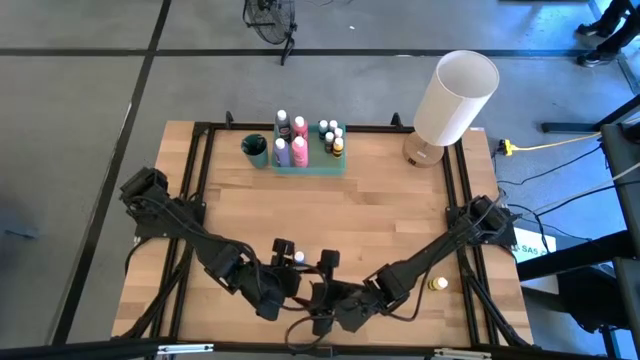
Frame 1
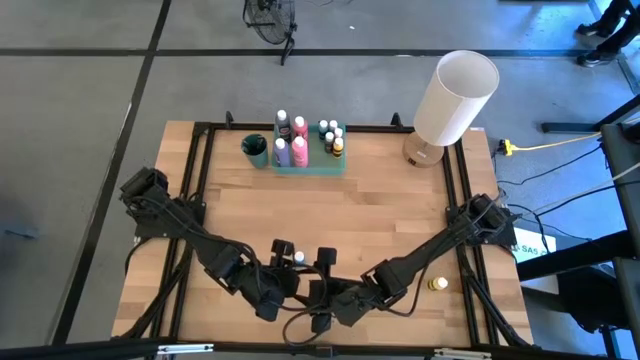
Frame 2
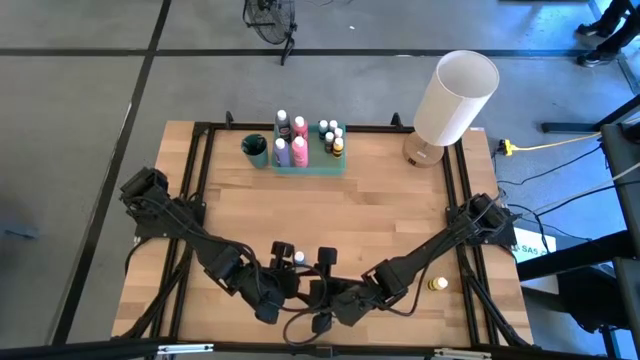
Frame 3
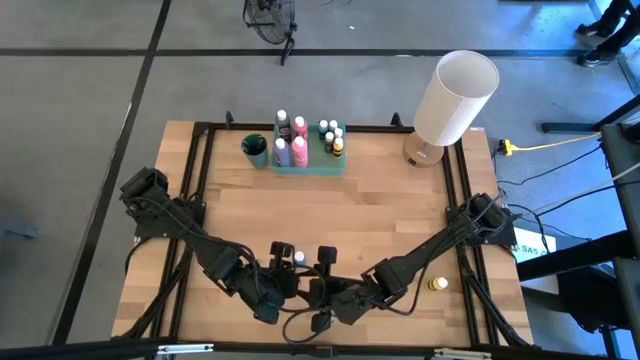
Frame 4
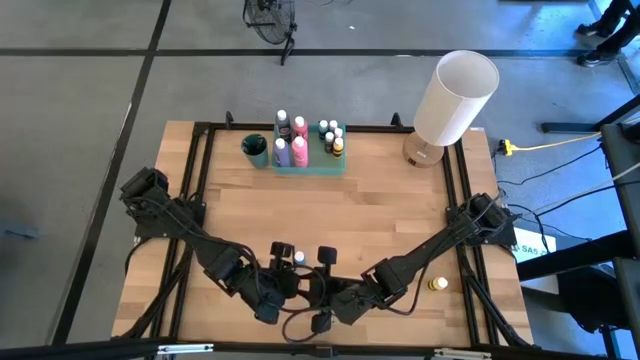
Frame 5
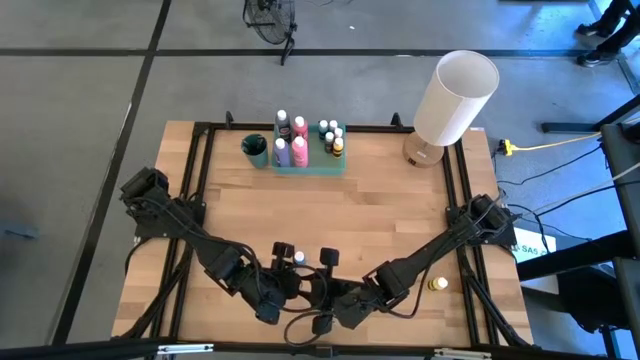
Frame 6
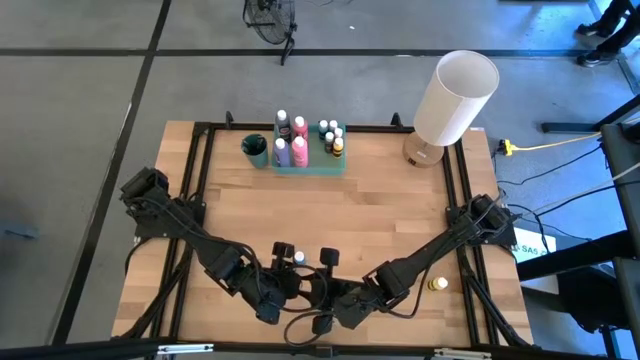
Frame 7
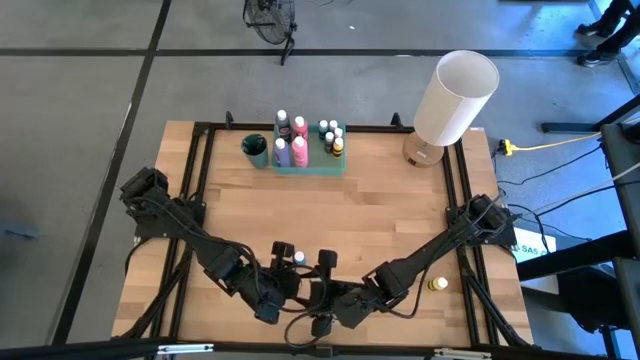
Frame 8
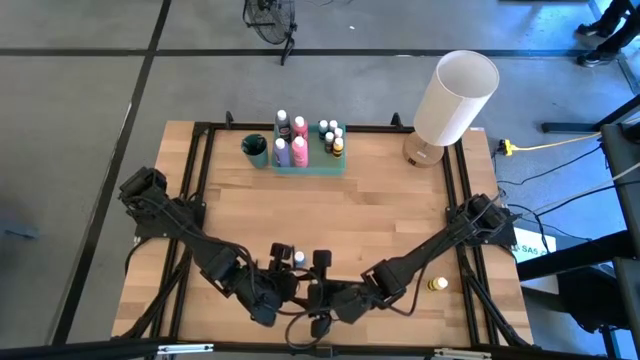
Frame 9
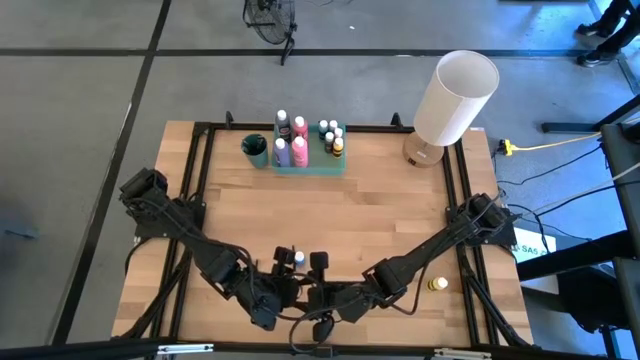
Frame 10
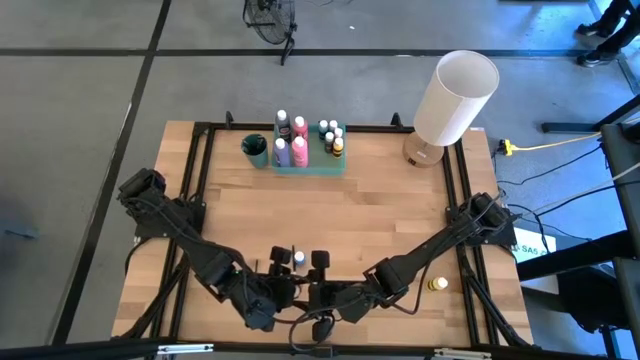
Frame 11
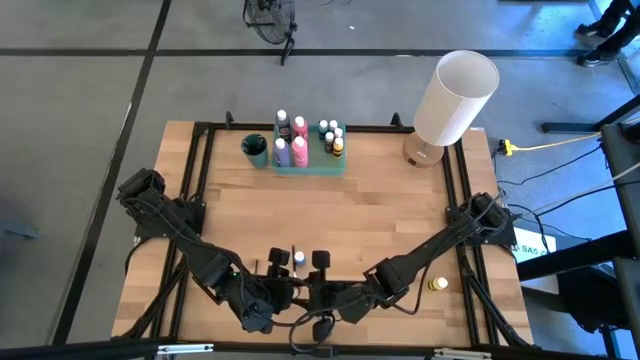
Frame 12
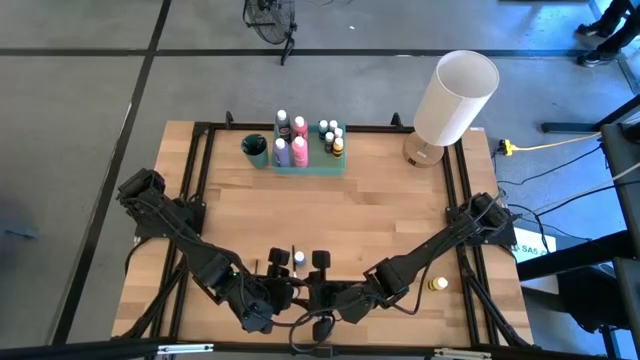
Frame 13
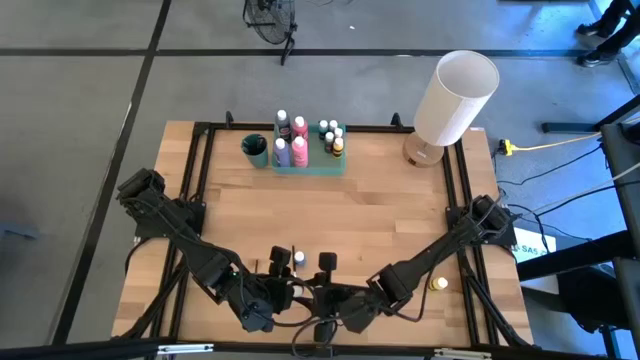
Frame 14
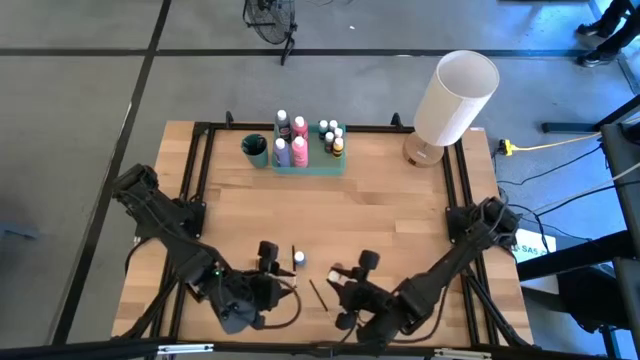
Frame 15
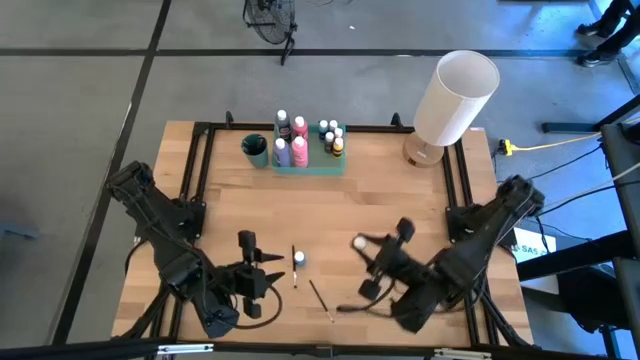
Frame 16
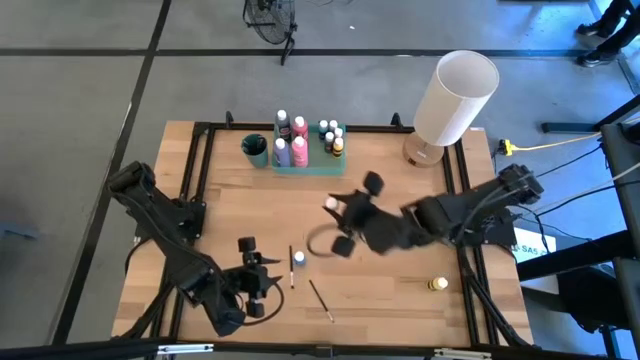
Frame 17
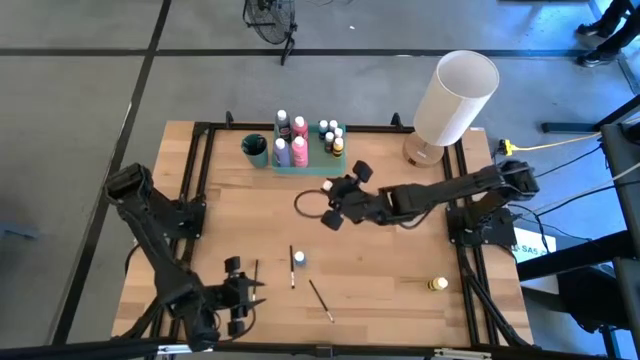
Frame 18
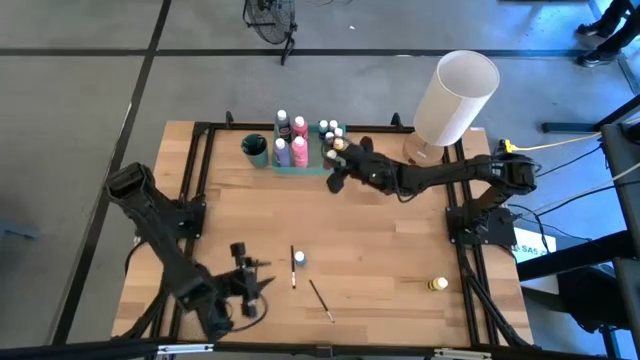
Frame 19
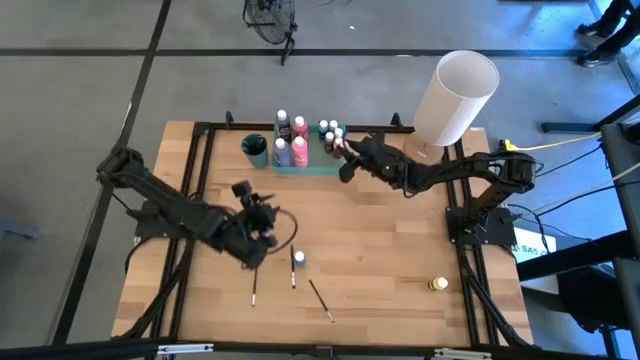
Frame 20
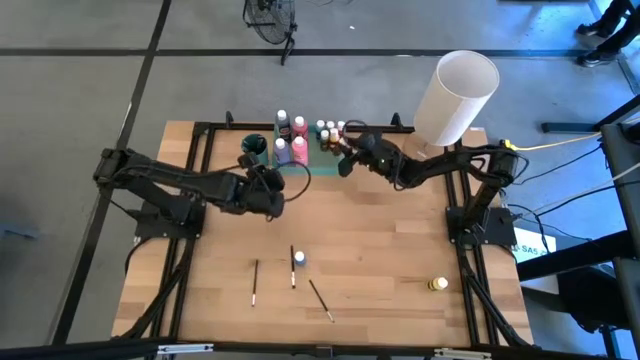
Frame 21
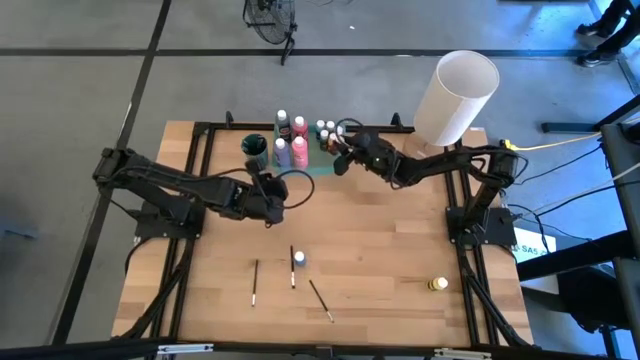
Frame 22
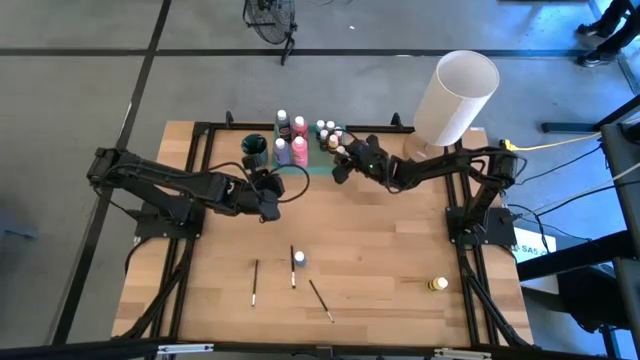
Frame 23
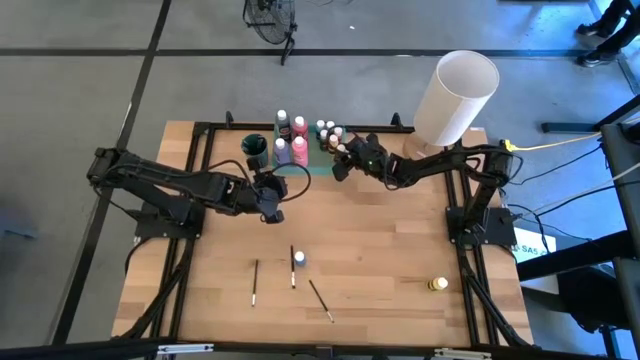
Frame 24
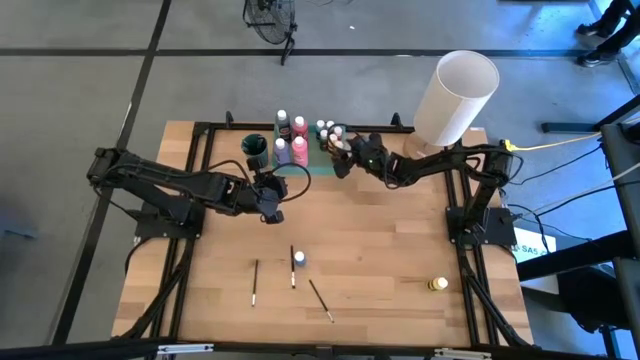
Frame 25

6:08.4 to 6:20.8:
Task: Pick & Place Paint Supplies
Put the small red paint bottle into the green bin

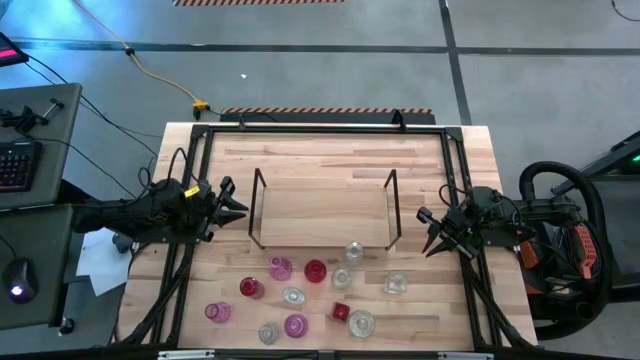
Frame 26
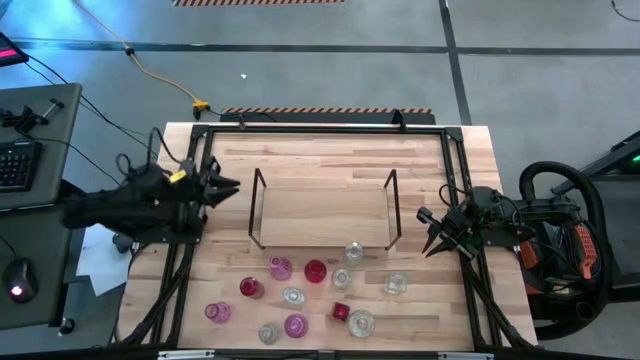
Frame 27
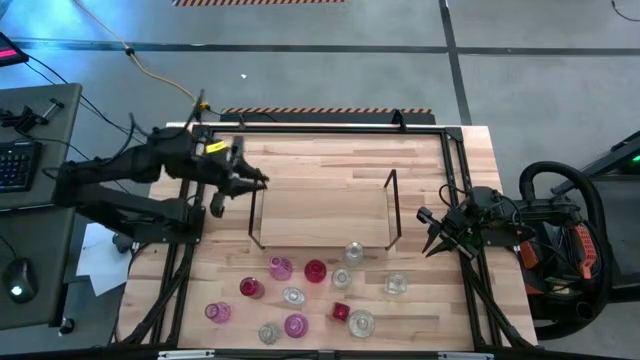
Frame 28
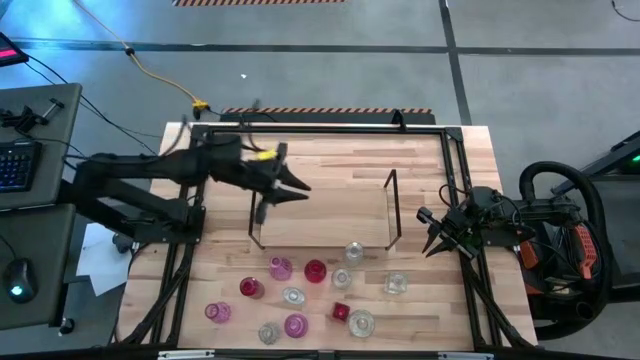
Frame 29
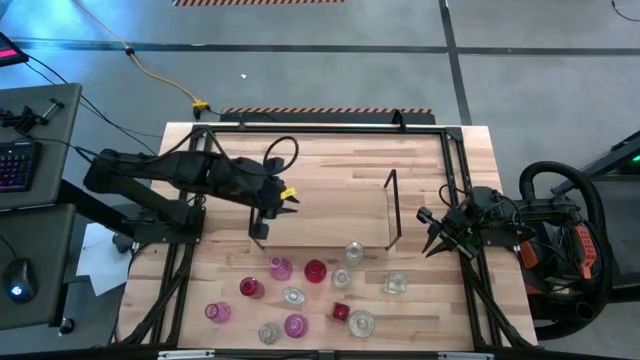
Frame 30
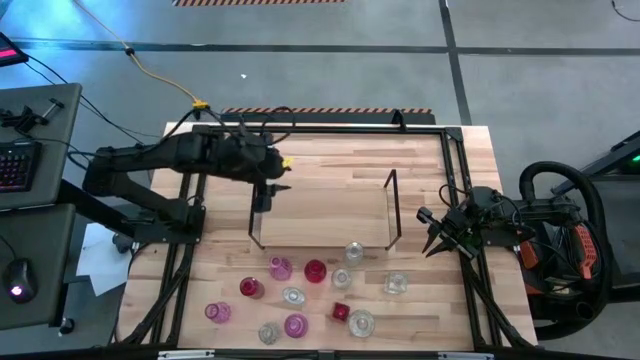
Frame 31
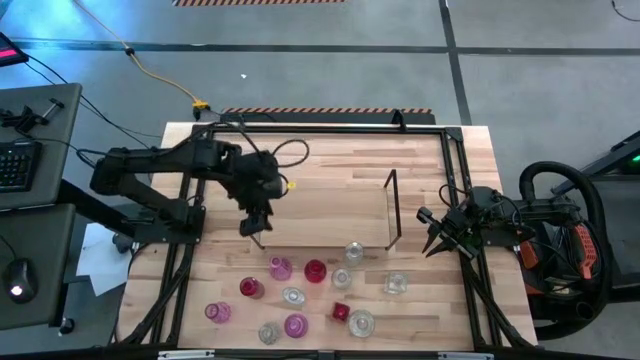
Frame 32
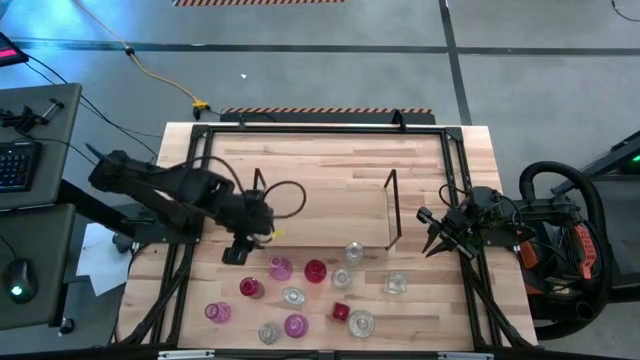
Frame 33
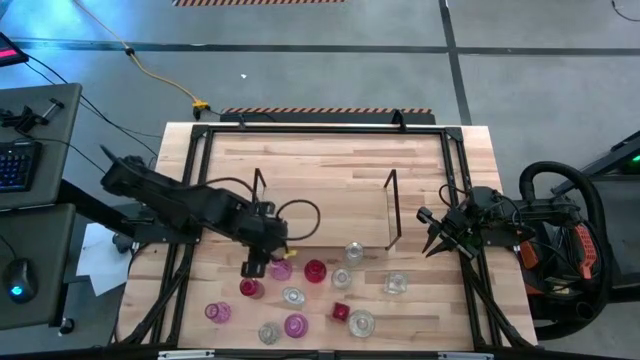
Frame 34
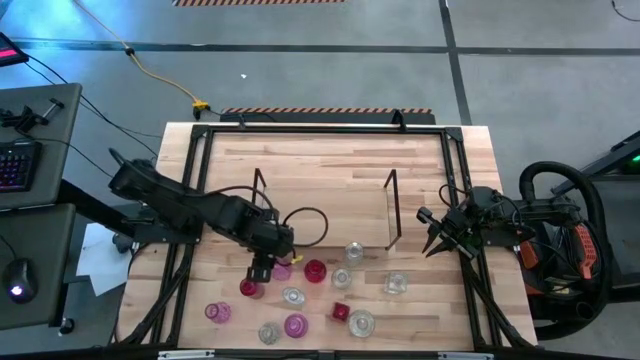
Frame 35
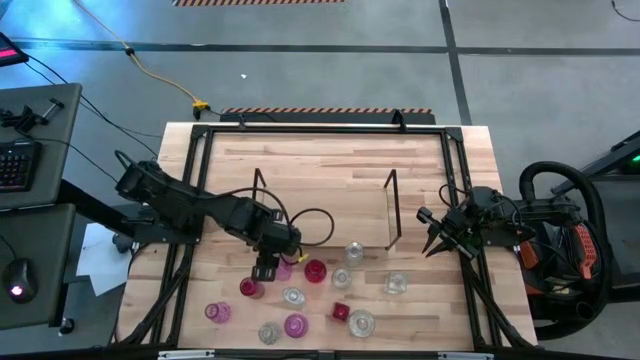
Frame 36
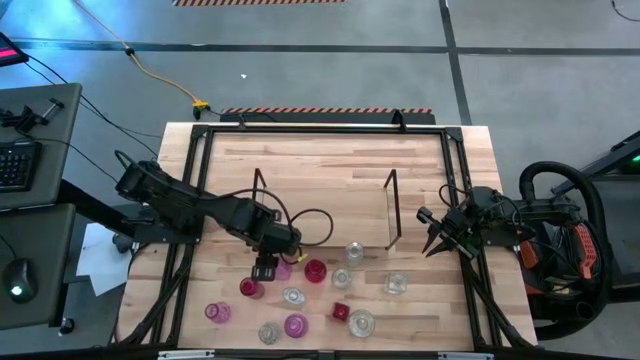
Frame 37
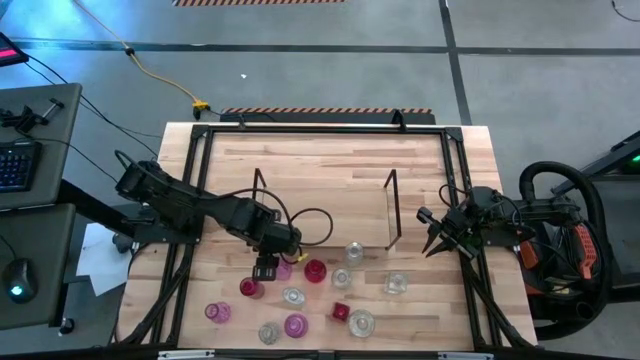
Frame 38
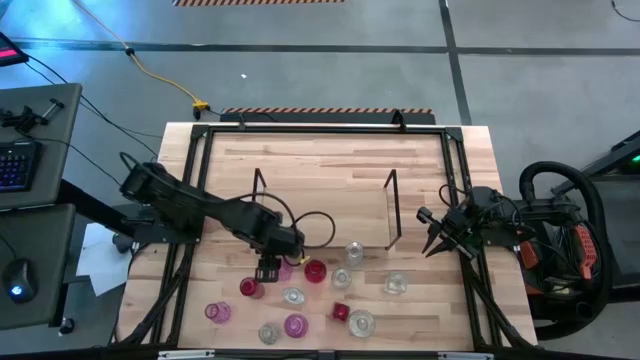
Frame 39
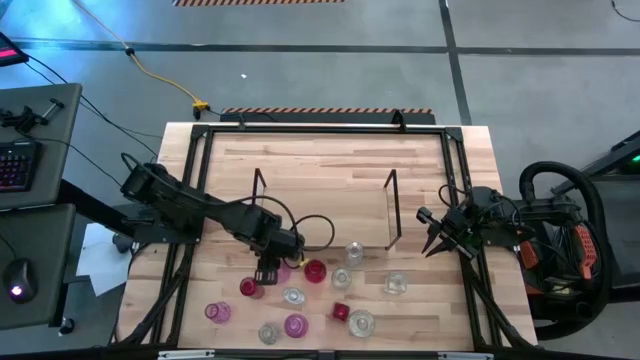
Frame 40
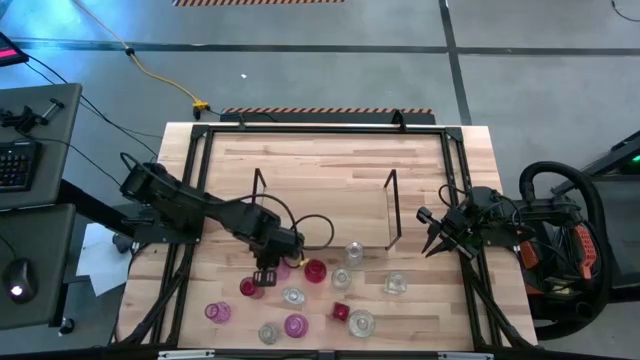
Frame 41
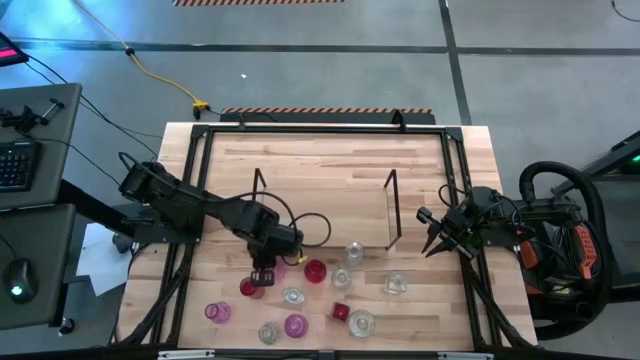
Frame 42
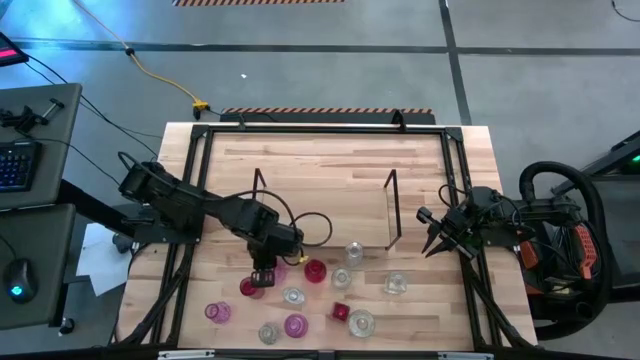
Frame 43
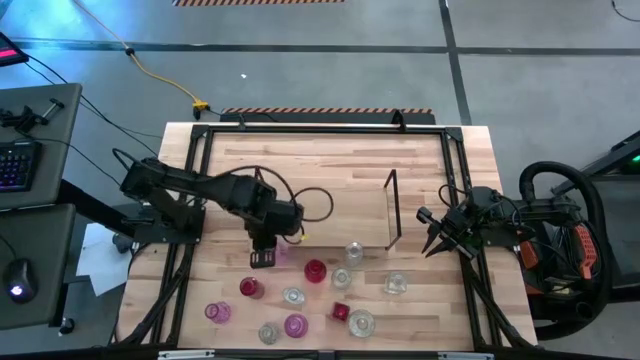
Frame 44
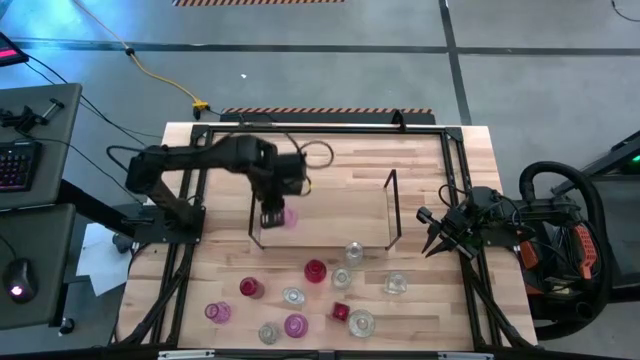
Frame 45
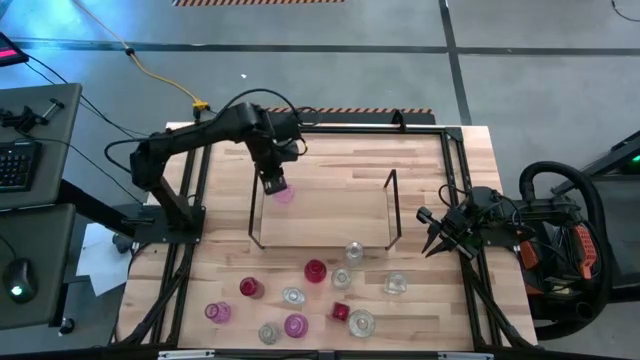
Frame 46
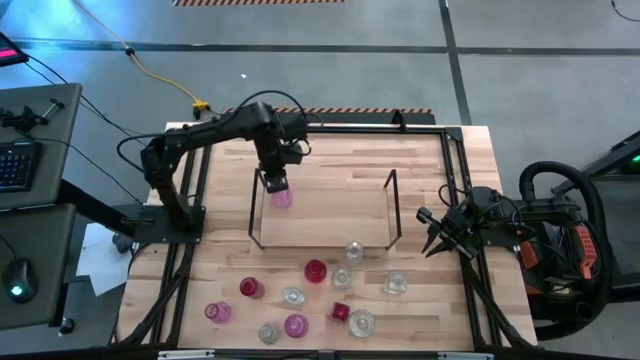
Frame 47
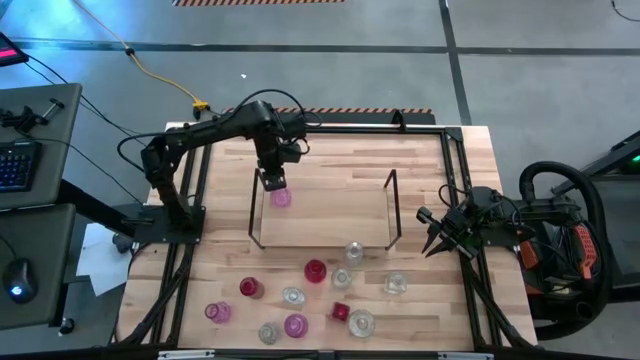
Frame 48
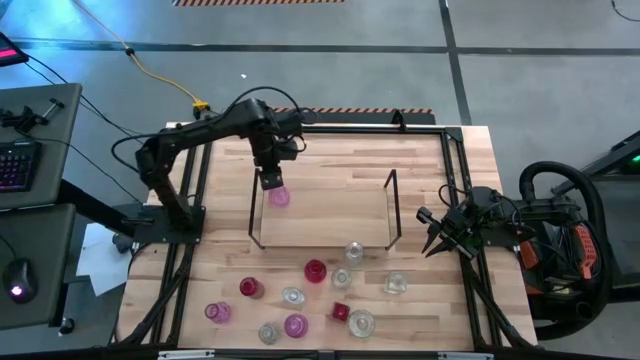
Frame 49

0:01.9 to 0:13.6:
Task: sort vases onto shelf
Put the pink vase on the shelf
